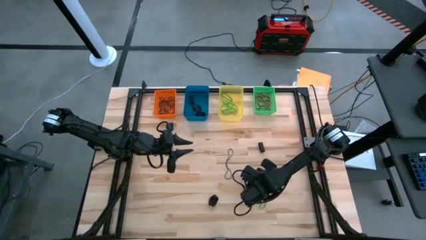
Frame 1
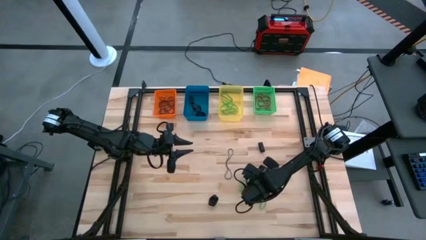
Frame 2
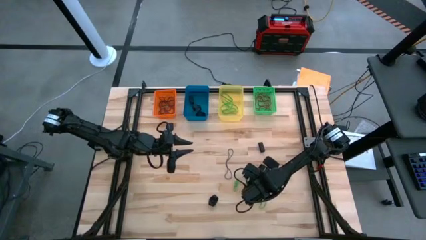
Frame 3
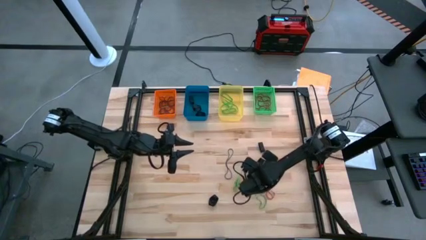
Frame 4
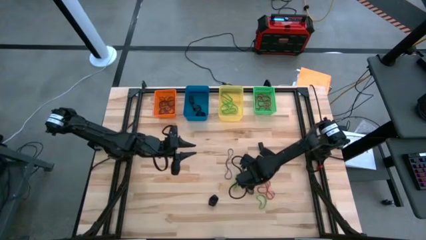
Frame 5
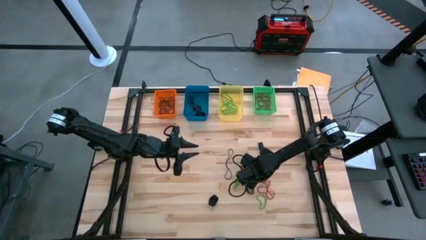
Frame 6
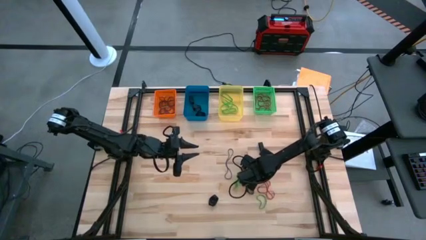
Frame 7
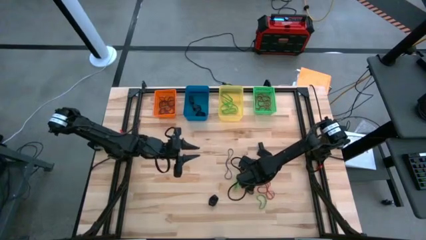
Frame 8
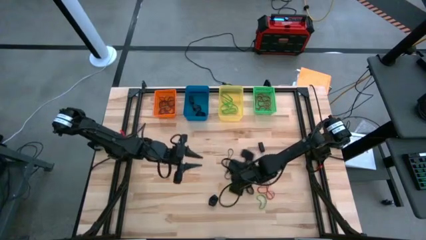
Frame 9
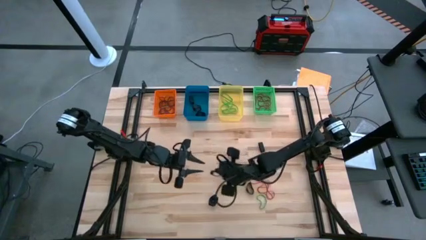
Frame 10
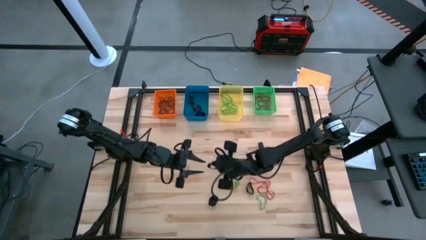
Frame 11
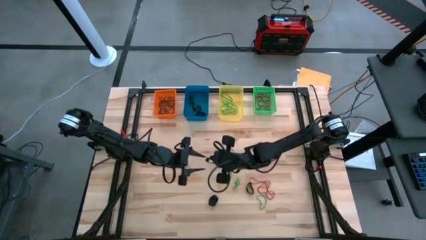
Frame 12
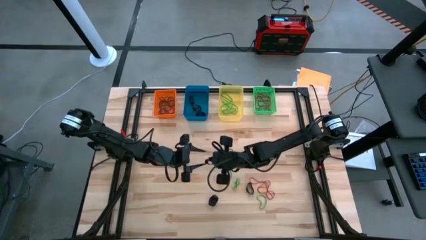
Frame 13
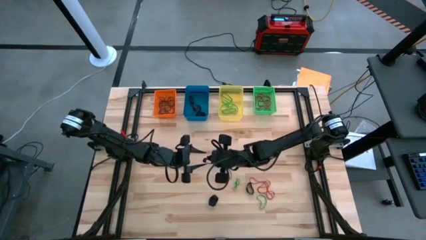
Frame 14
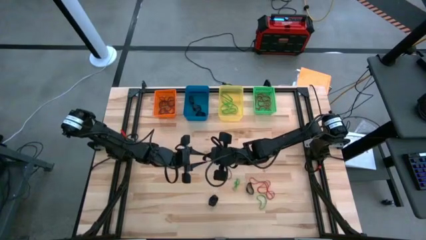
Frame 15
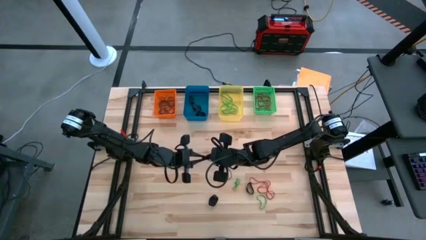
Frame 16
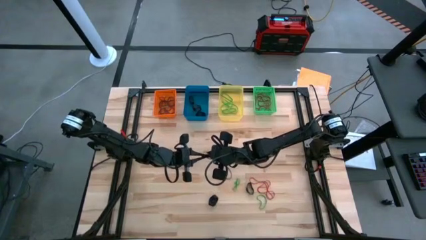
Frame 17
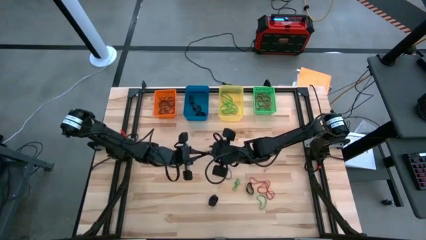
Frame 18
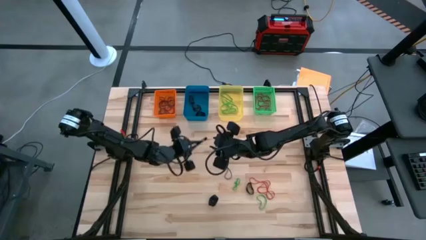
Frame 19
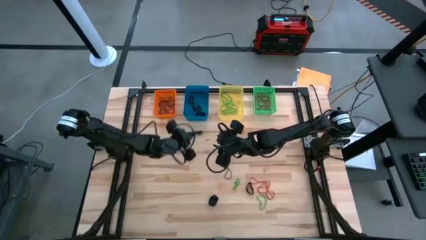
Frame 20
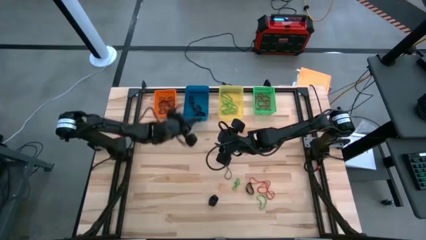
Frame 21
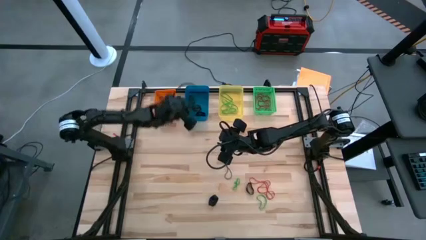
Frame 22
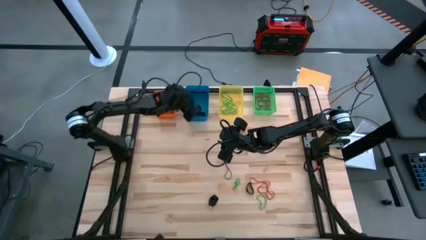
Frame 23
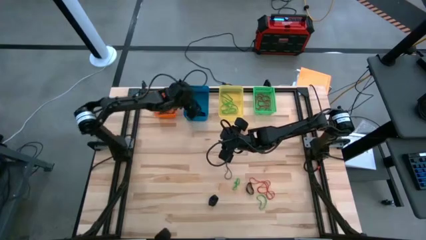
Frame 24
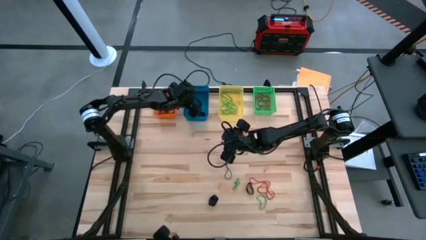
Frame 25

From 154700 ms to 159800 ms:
Task: Sort rubber bands into baskets
Put the black rubber band into the blue bin

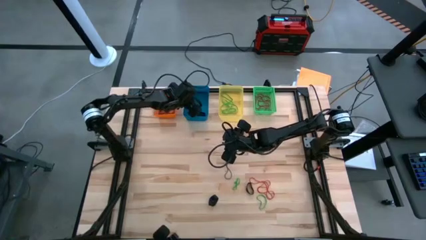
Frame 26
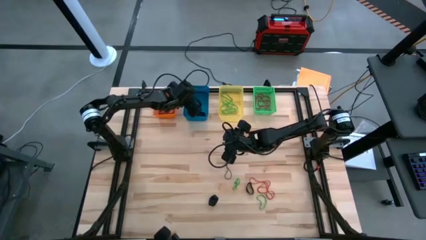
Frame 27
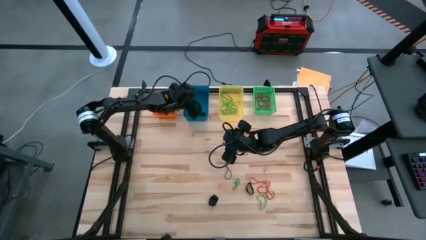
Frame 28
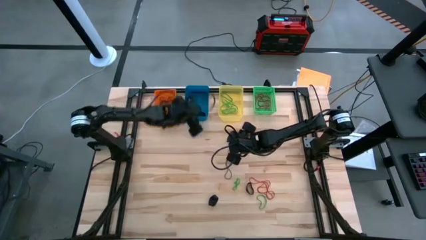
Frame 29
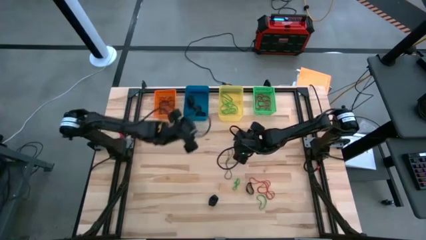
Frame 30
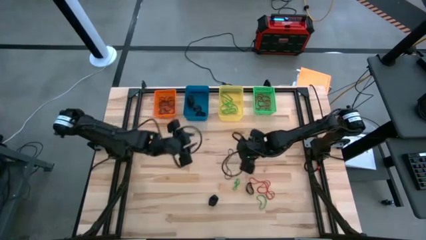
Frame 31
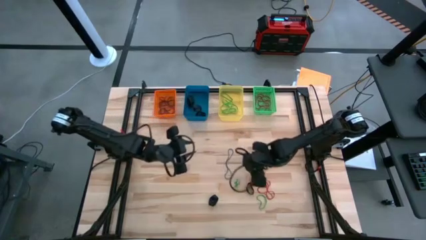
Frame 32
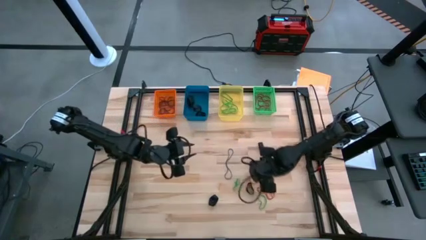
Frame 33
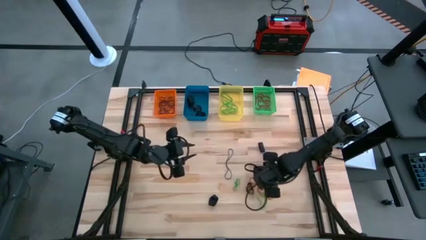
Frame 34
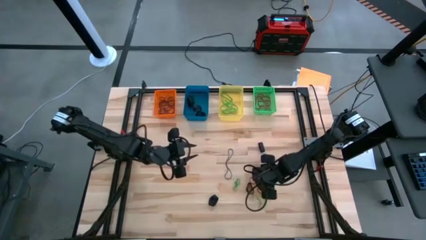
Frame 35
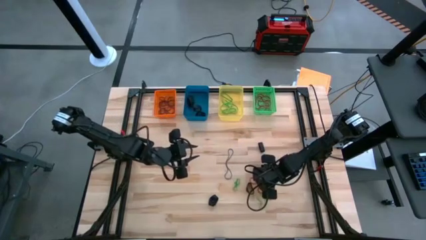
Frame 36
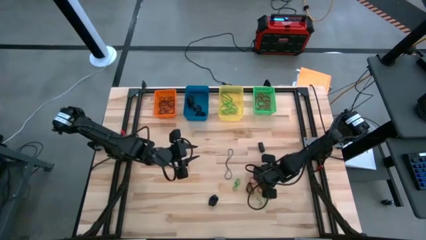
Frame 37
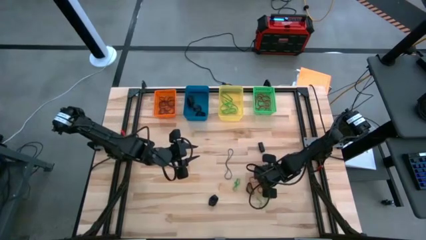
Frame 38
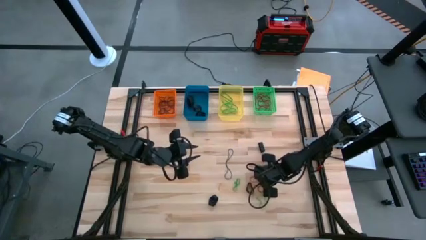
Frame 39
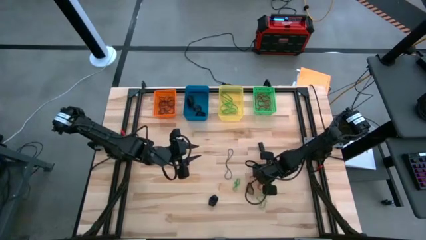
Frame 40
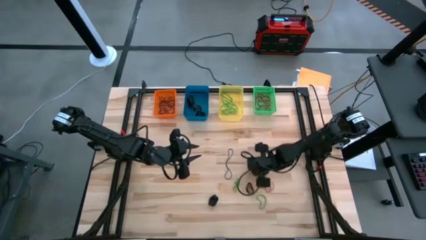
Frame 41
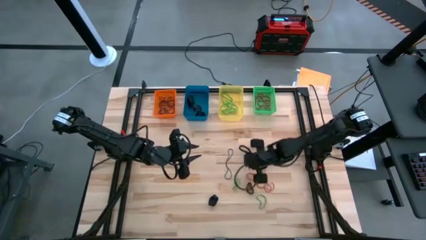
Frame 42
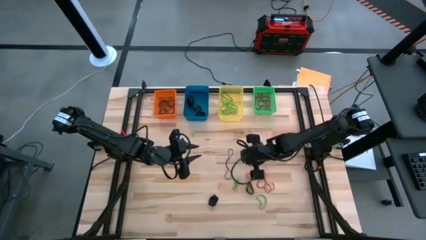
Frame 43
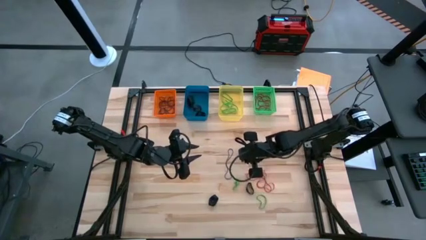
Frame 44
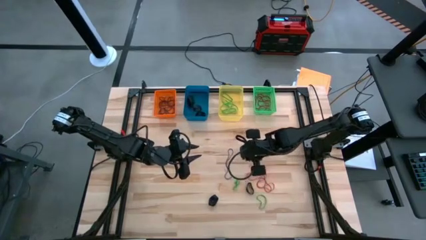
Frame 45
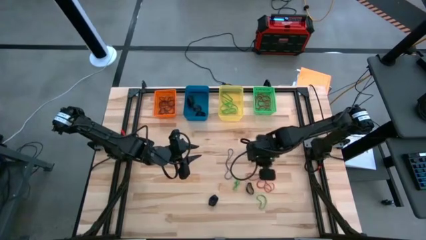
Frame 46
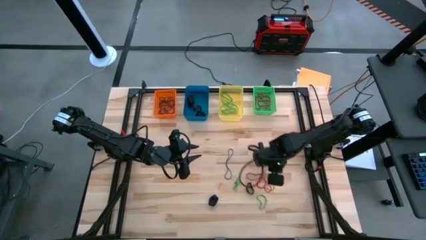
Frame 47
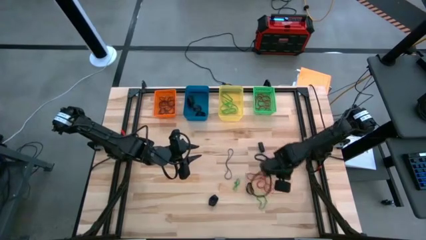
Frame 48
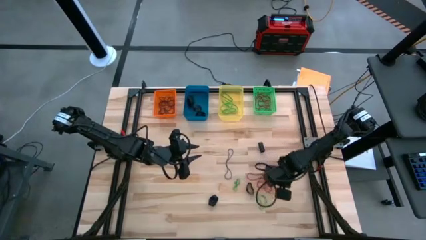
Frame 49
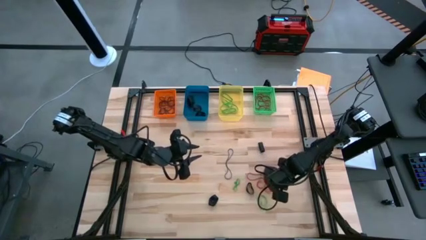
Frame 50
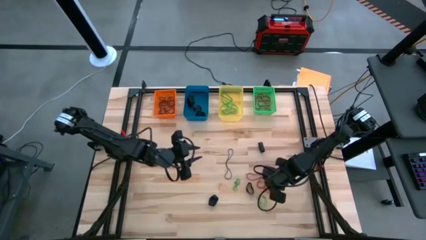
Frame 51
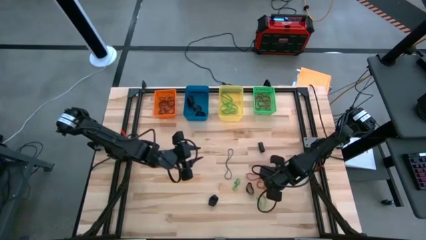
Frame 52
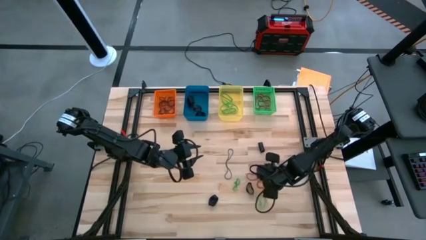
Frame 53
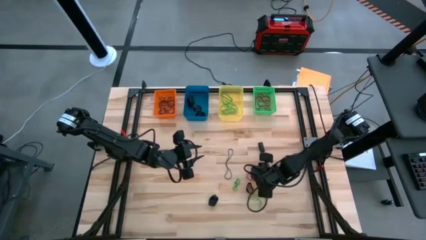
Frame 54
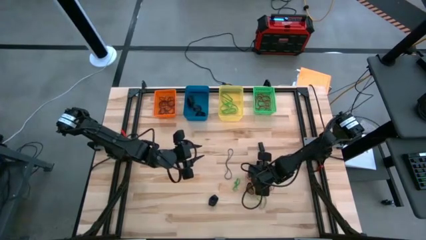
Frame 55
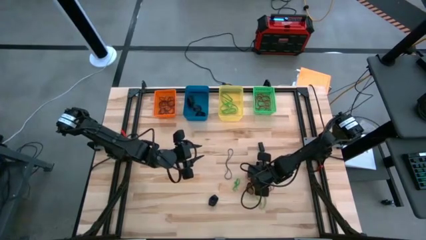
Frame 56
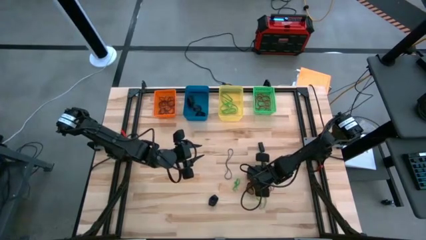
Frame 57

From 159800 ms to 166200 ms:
Put the red rubber band into the green bin
